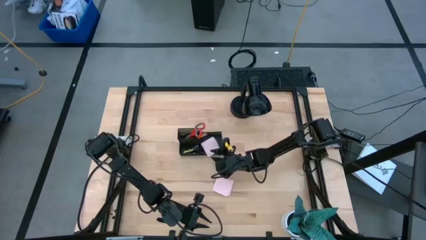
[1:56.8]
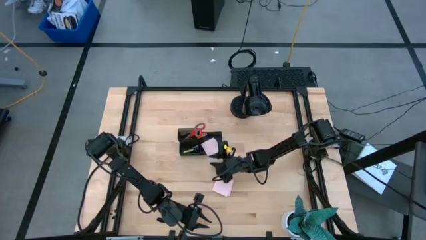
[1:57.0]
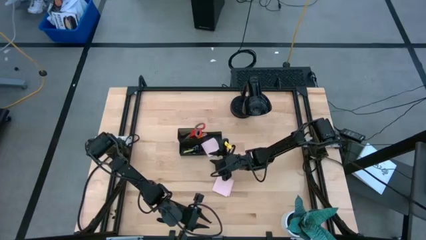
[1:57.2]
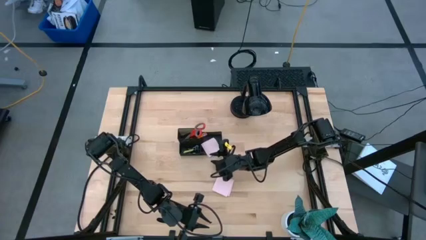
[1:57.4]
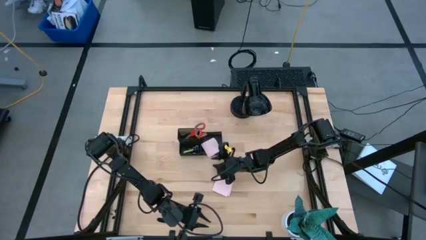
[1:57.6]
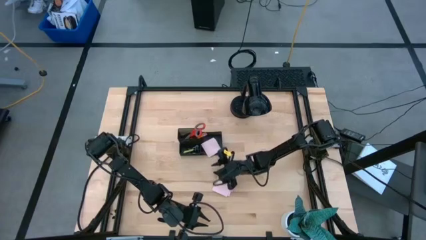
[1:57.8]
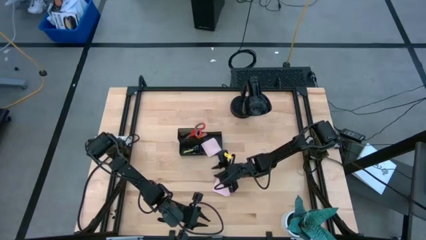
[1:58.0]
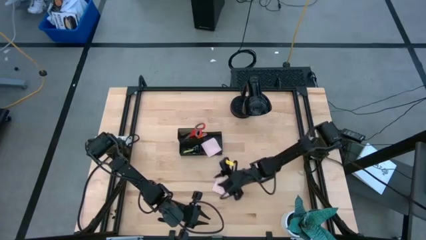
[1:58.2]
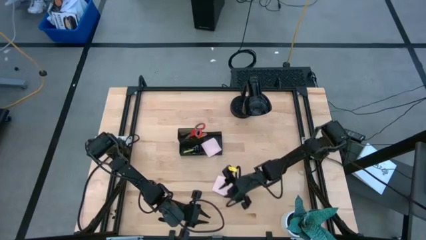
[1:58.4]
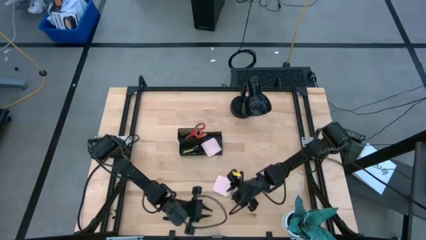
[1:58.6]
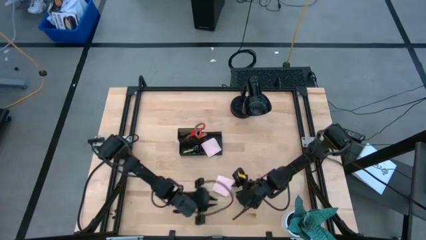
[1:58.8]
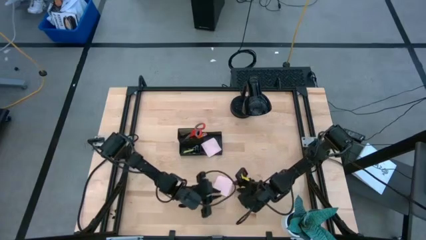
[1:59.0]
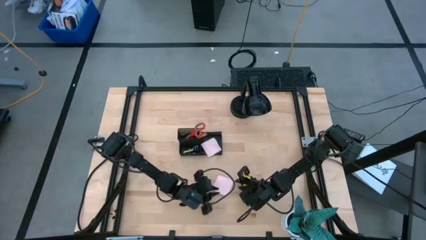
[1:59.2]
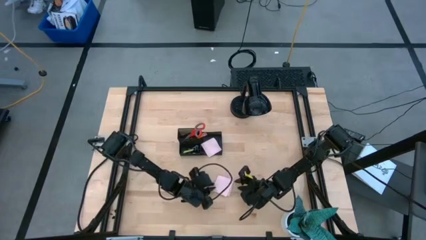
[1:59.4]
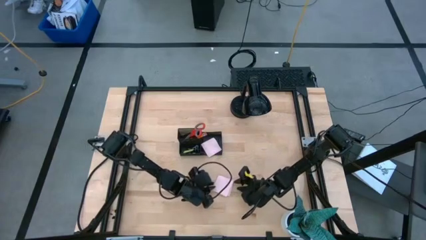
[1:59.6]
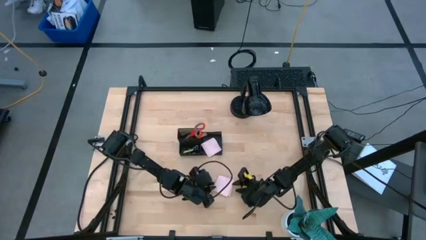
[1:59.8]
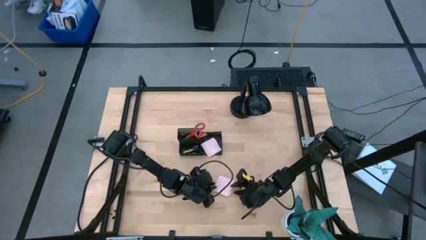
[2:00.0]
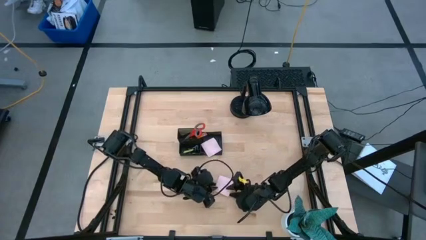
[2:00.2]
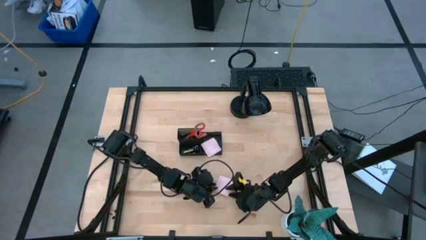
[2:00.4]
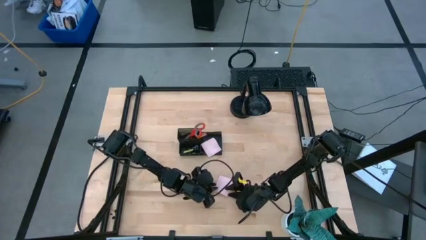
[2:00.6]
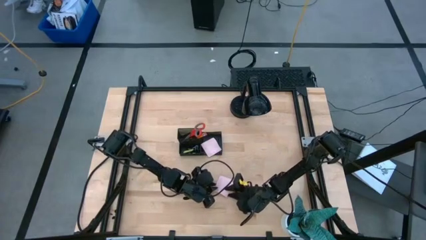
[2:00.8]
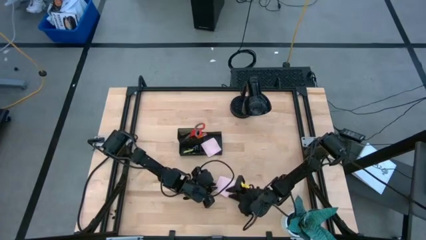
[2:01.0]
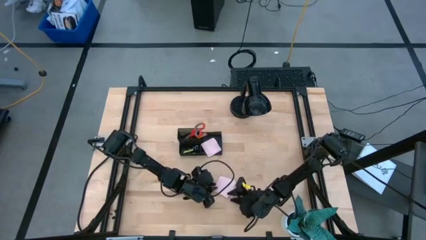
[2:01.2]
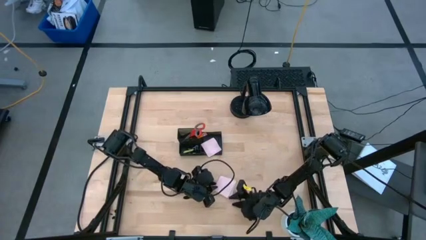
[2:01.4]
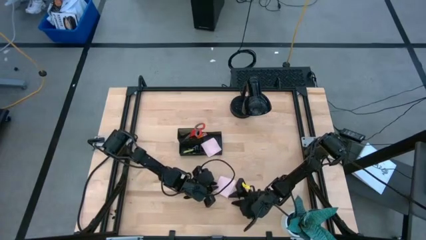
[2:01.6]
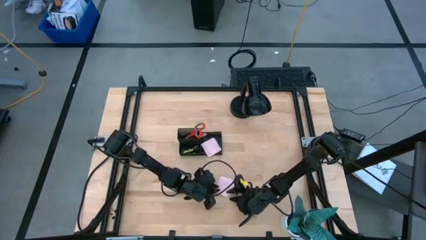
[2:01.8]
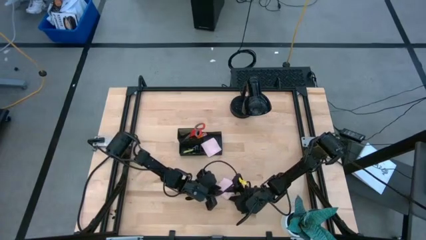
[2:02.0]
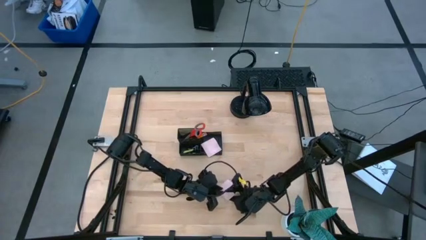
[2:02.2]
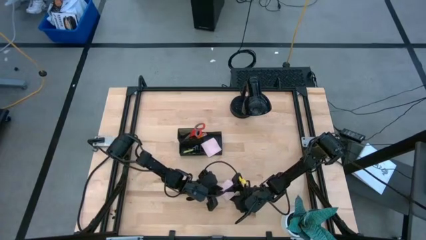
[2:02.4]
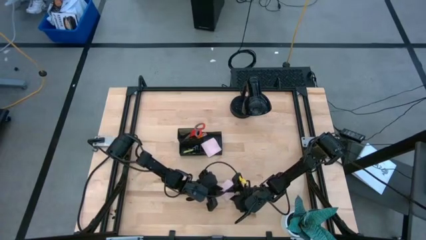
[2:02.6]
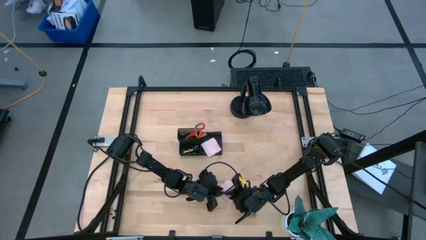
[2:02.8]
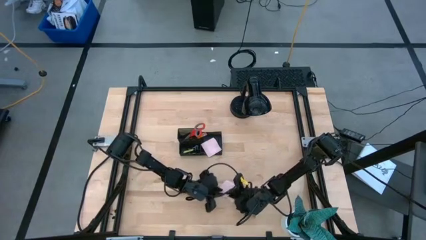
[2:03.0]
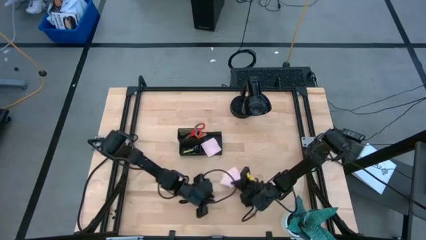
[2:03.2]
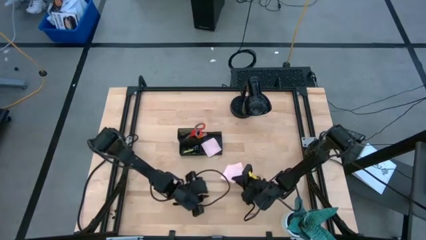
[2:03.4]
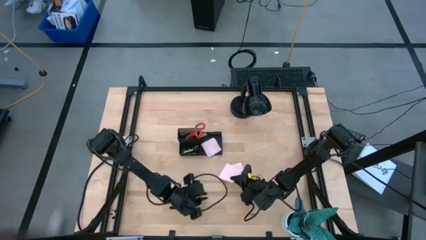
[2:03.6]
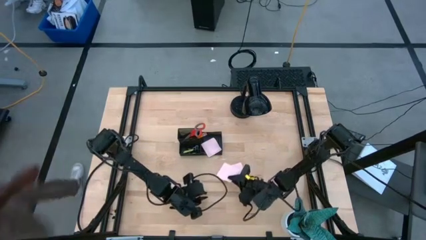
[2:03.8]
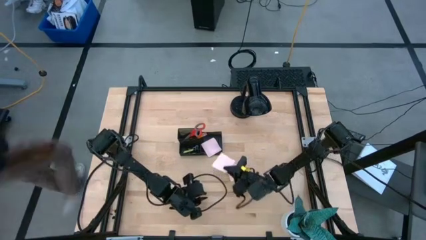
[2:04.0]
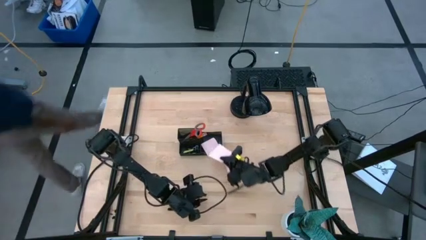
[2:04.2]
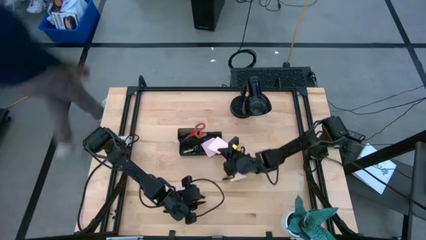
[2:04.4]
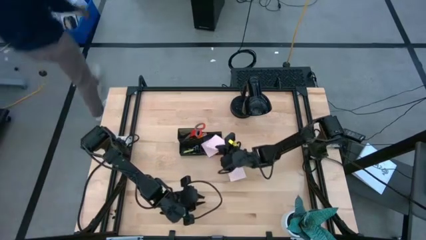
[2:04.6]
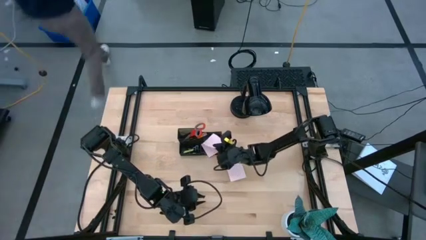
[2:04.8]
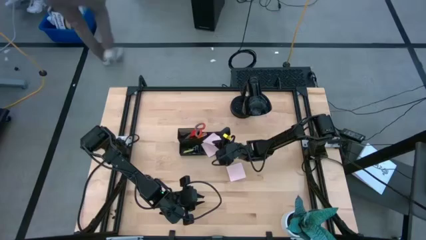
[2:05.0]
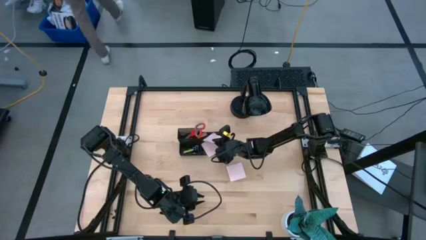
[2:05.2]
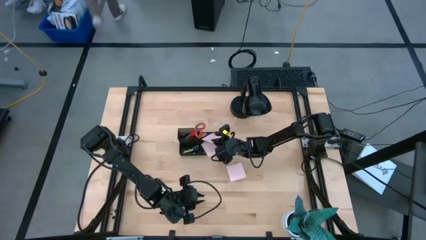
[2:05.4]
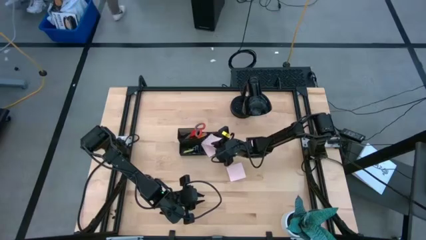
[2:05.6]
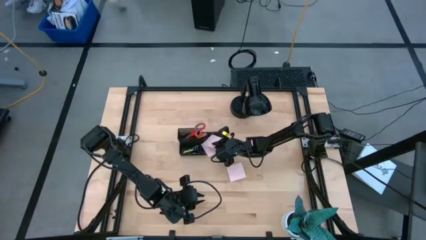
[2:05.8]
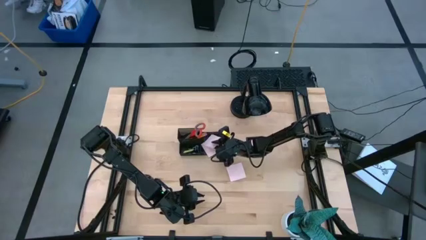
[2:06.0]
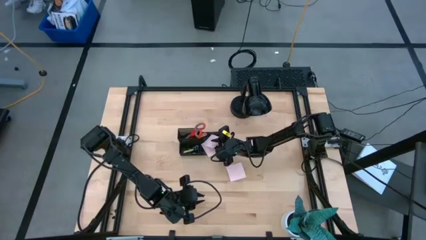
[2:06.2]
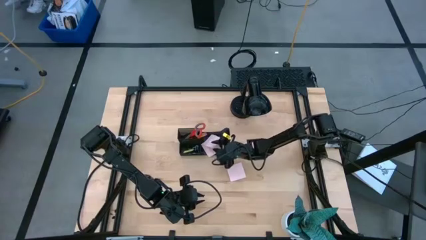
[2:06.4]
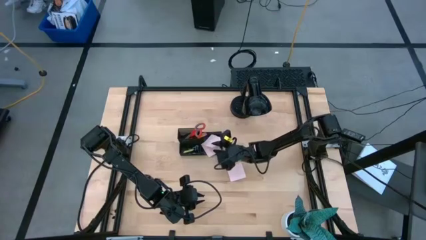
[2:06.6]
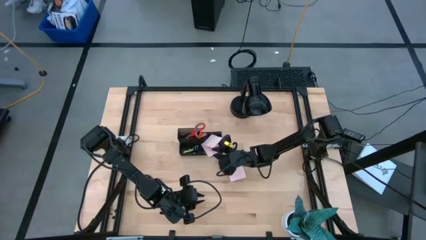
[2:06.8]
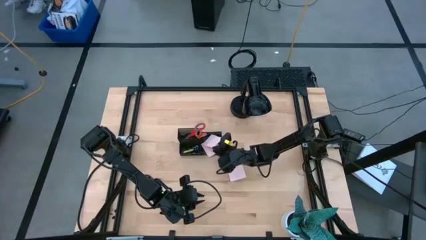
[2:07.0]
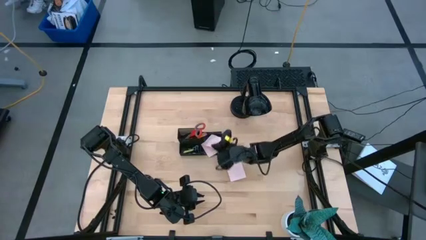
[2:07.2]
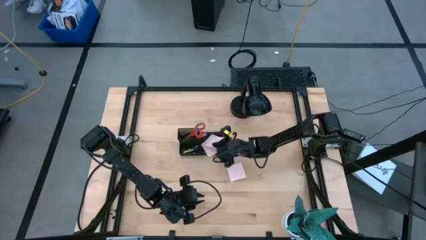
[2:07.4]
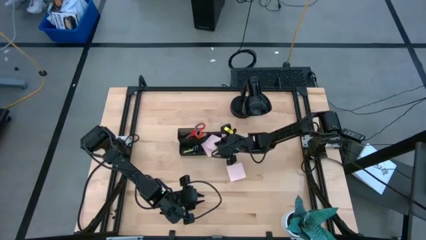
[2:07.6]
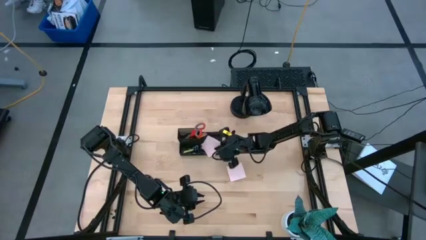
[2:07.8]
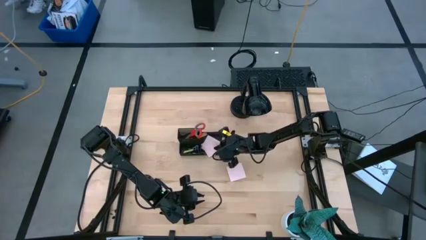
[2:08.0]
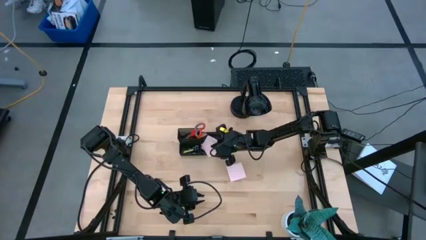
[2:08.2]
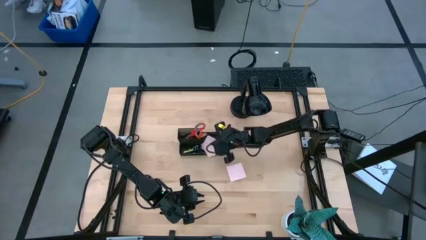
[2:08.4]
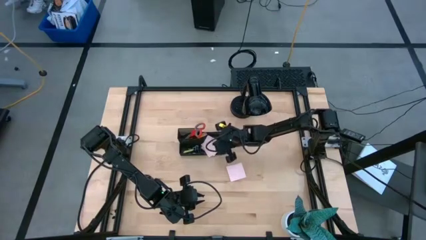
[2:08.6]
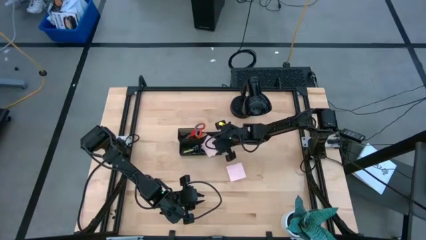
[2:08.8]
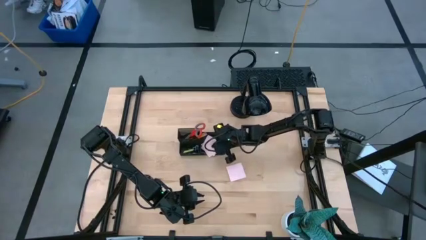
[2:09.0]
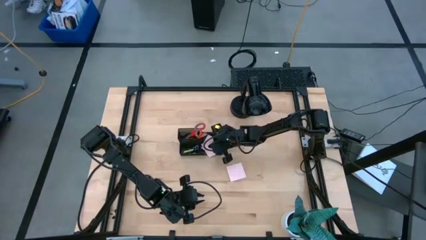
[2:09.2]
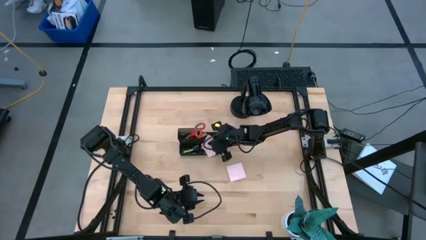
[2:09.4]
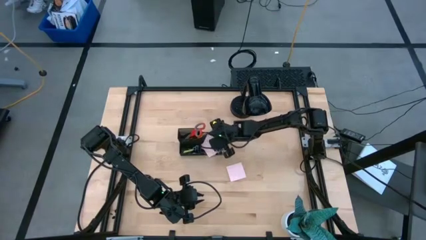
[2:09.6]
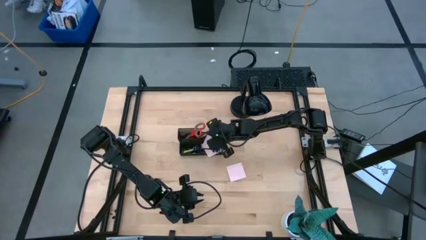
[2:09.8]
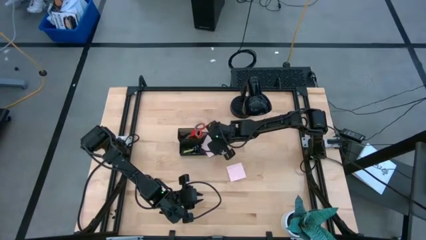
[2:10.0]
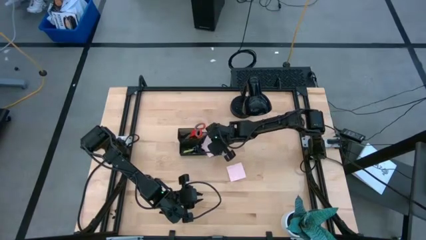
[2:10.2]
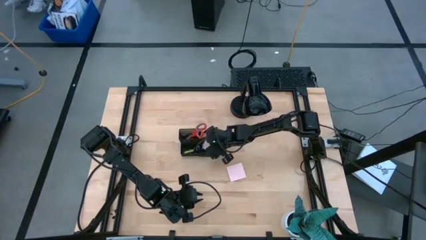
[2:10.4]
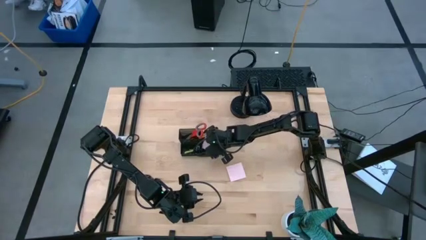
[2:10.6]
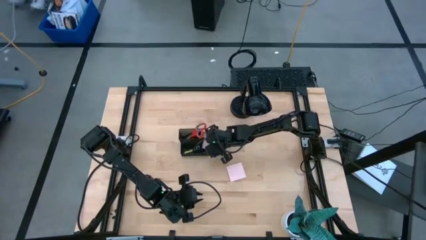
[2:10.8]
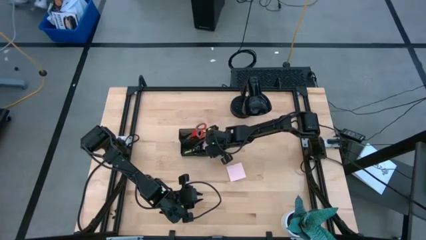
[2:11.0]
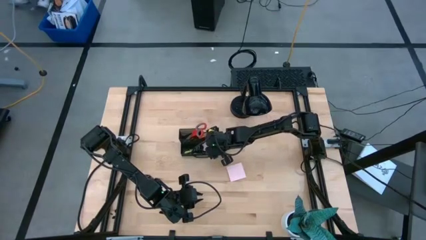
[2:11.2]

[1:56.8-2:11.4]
Task: Pick and place office supplies into organizer
Put the pink sticky notes into the black desk organizer

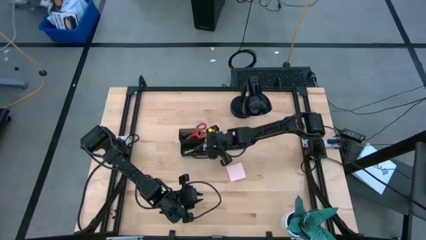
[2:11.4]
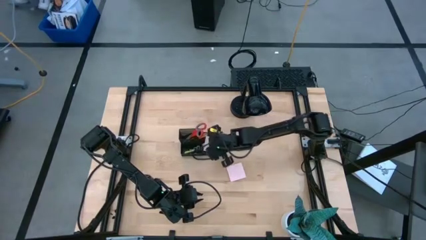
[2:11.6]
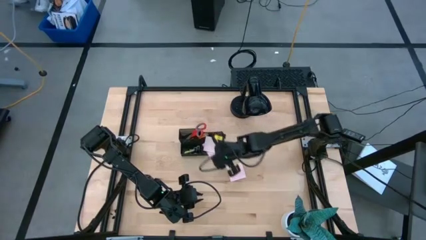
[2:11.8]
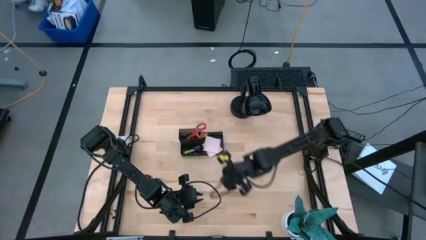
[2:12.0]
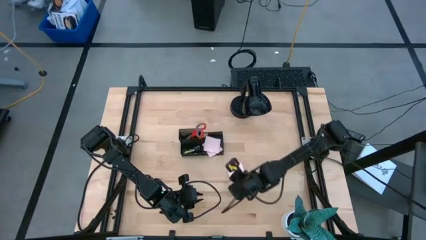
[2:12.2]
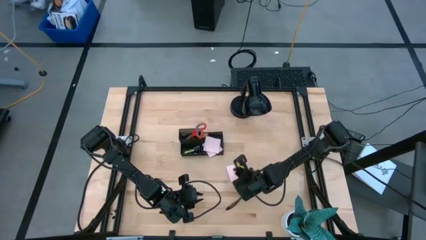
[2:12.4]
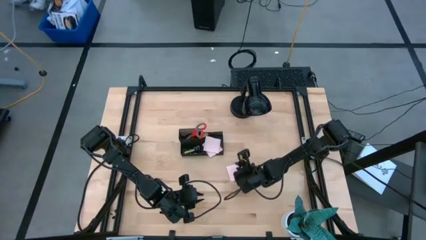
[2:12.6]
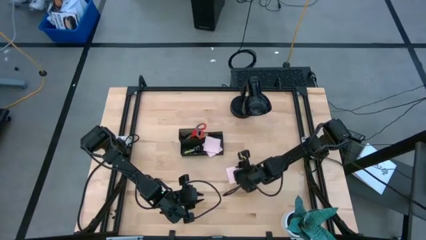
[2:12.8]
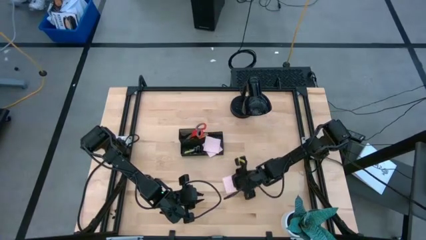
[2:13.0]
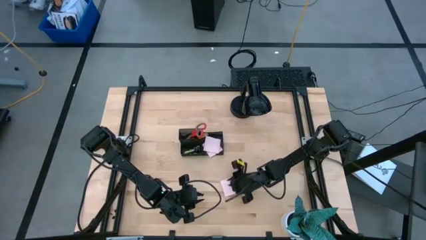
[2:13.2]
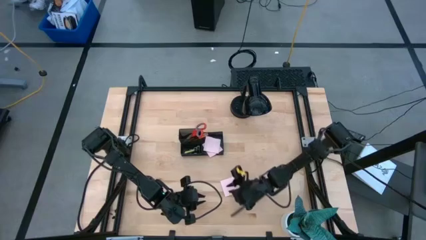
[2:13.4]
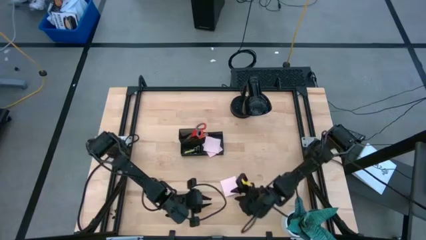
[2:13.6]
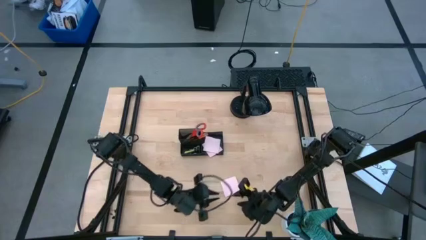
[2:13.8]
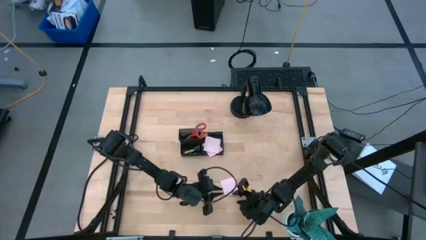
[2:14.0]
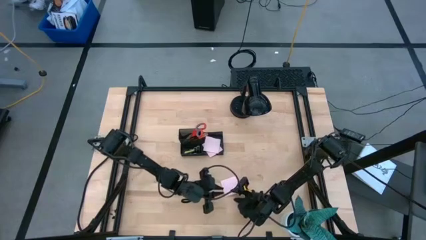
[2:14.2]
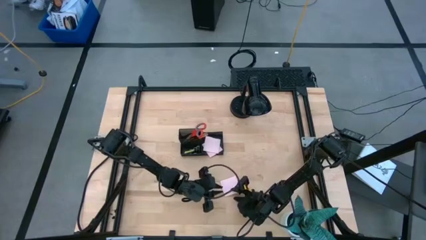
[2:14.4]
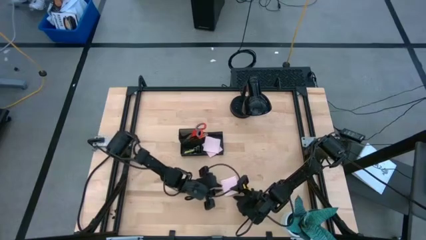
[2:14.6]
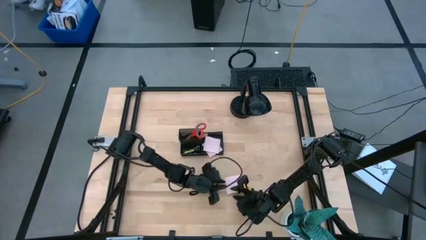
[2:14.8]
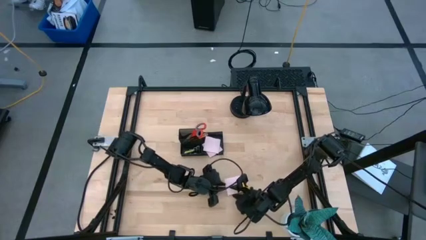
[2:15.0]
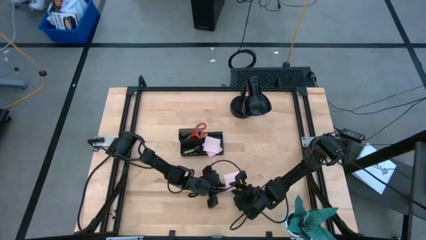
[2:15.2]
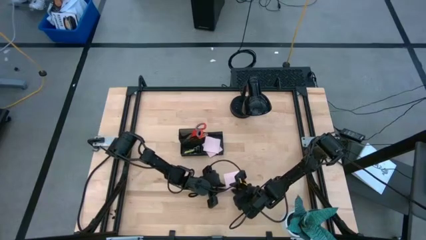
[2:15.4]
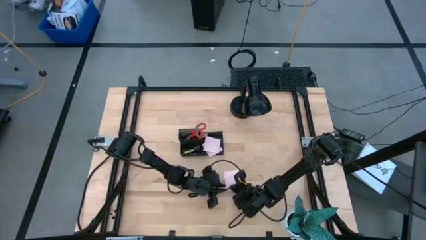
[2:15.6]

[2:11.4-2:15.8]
Put the pink sticky notes into the black desk organizer
